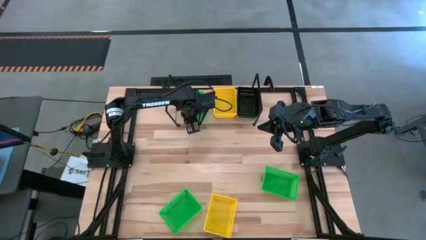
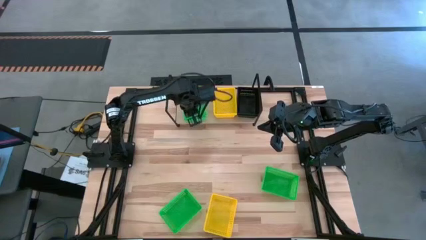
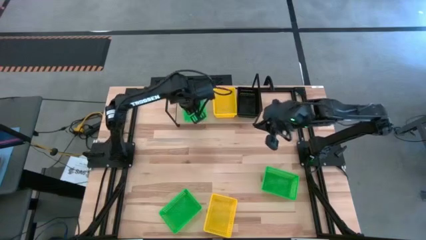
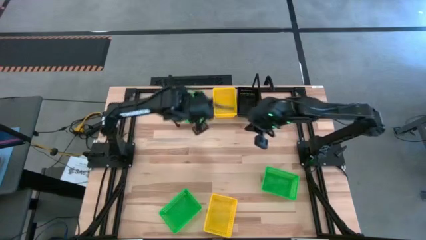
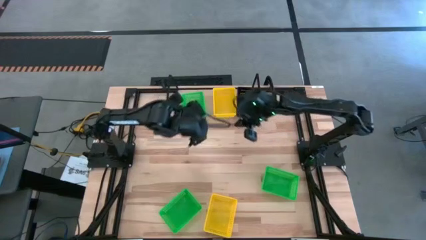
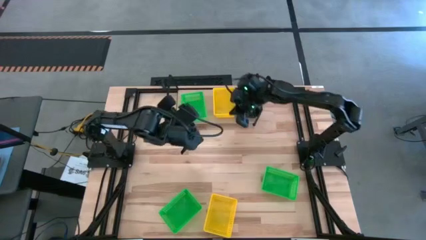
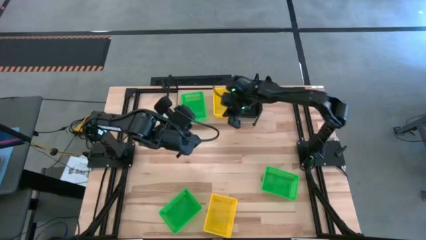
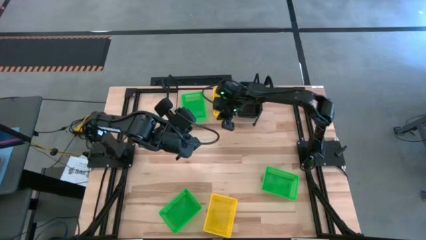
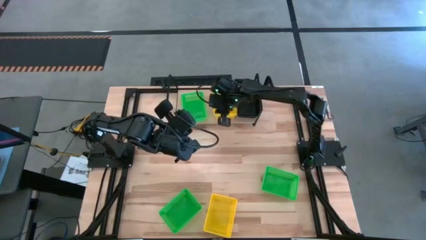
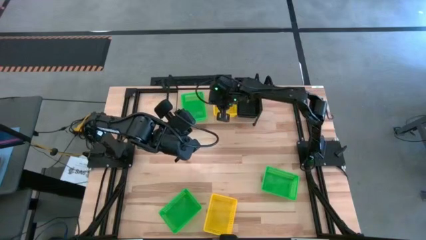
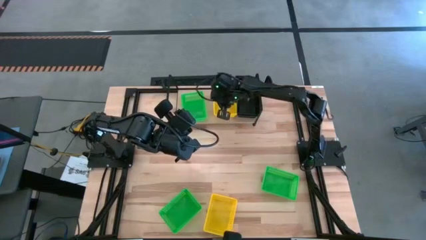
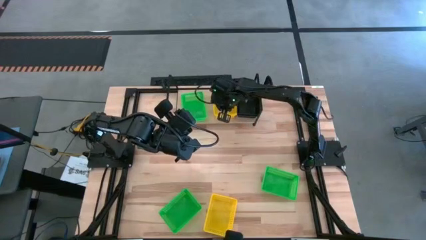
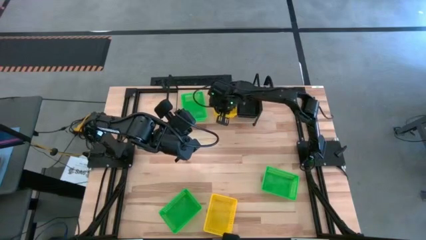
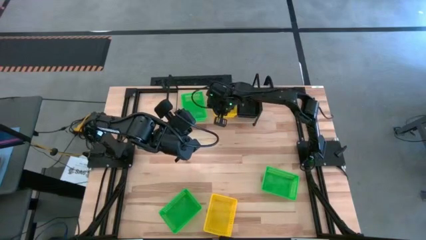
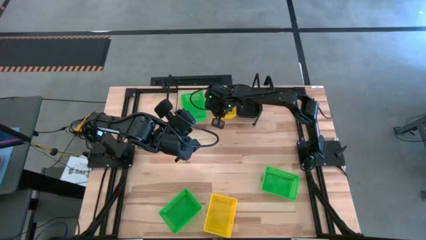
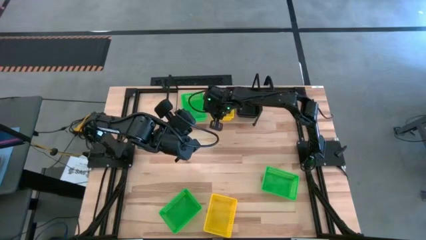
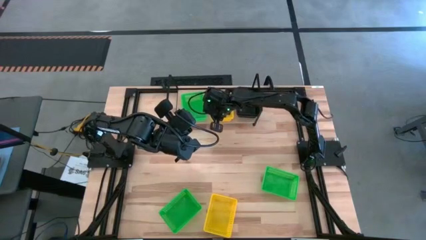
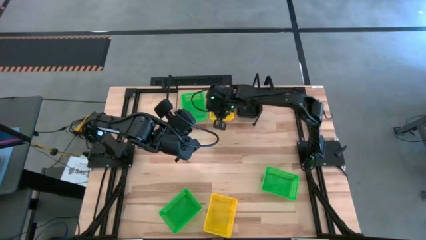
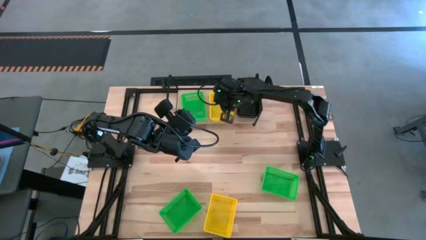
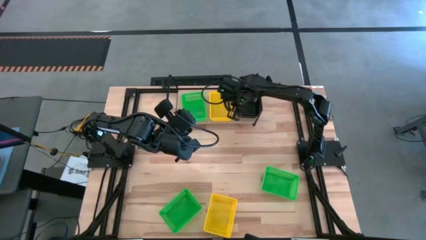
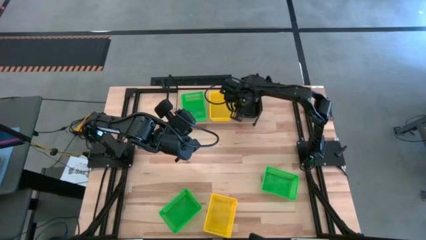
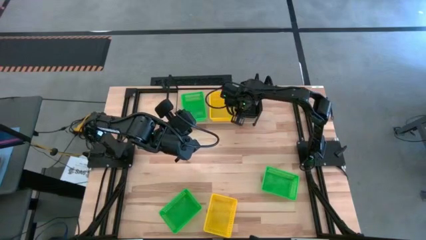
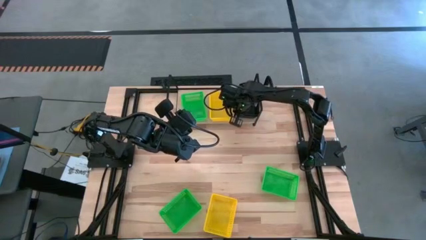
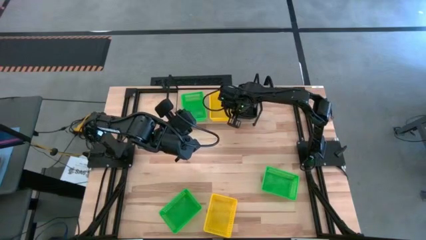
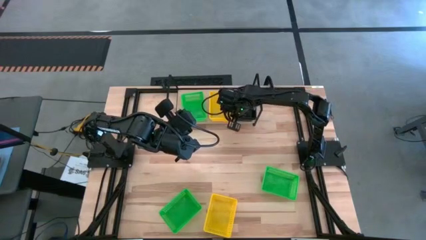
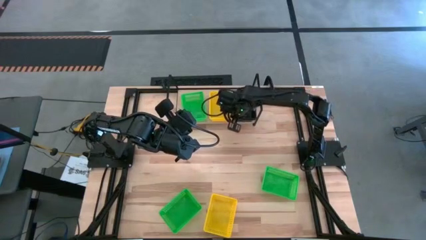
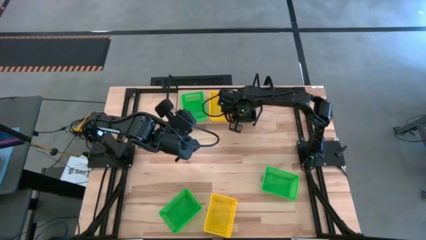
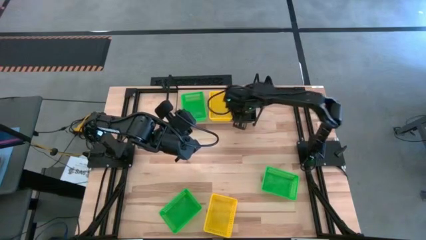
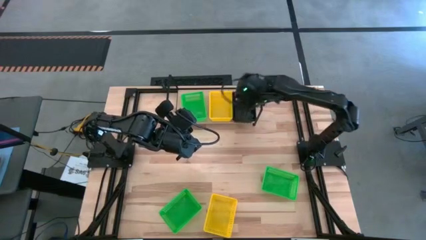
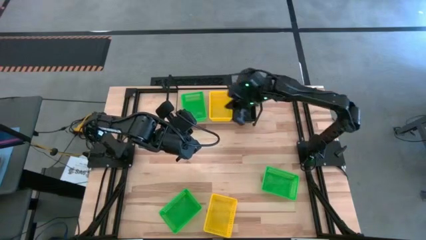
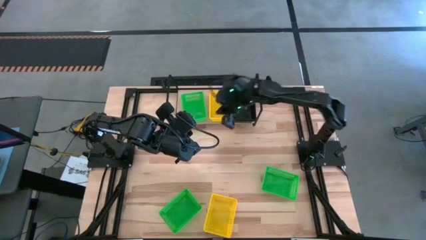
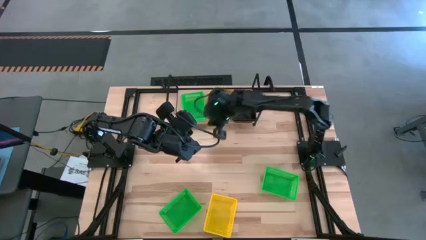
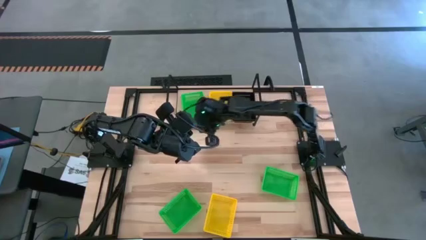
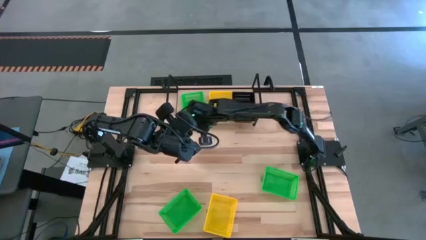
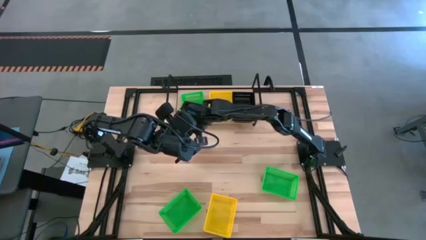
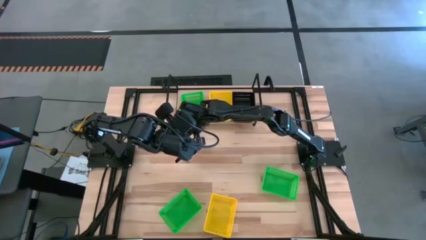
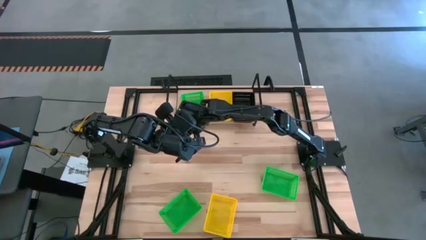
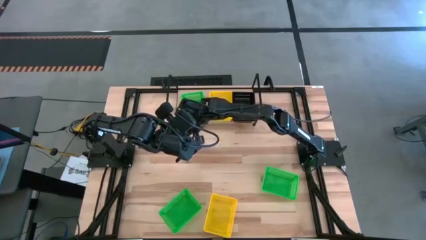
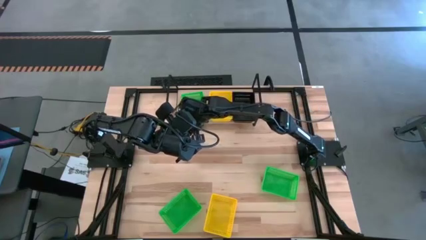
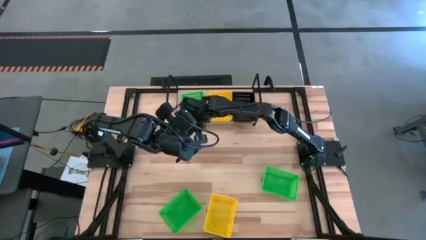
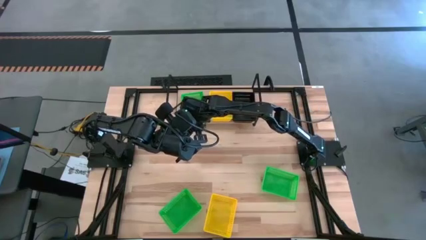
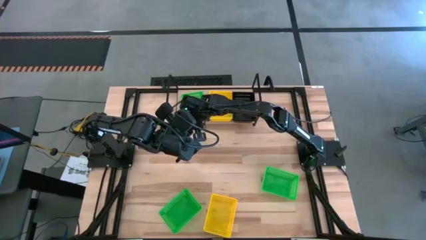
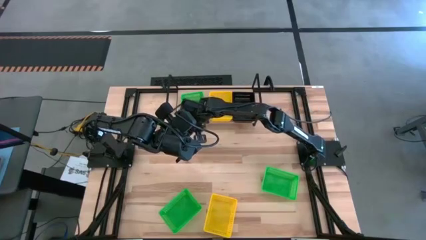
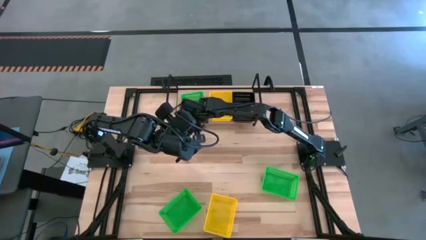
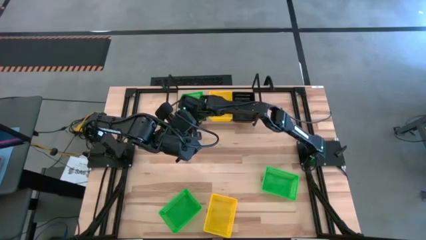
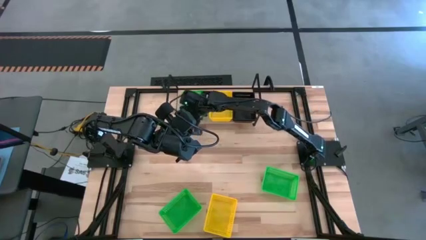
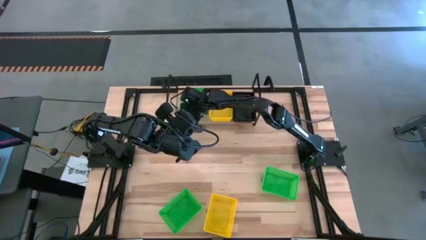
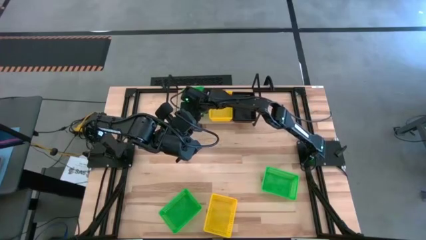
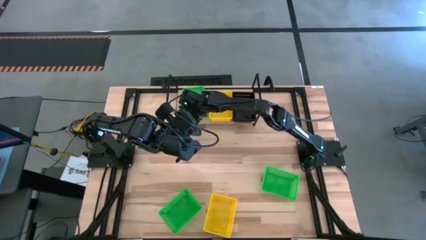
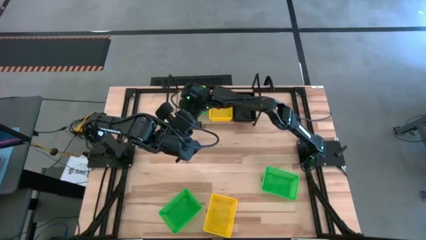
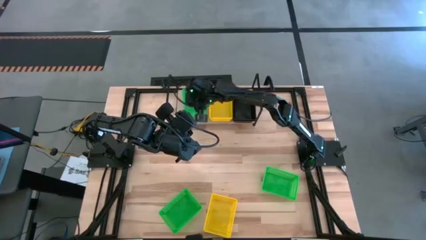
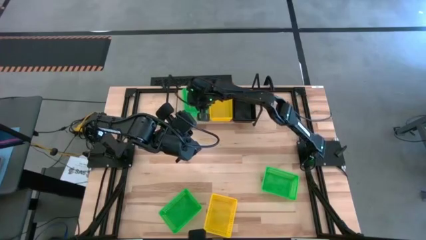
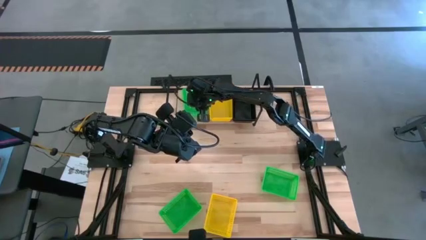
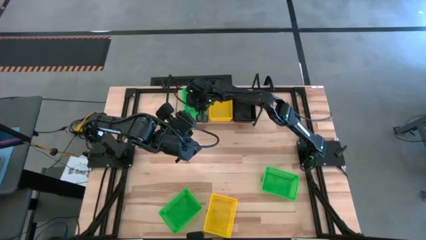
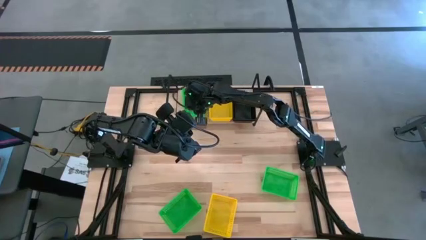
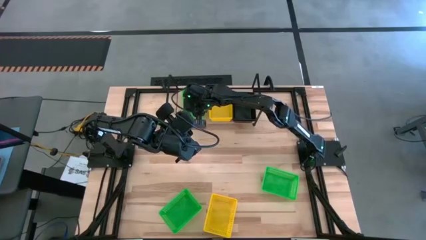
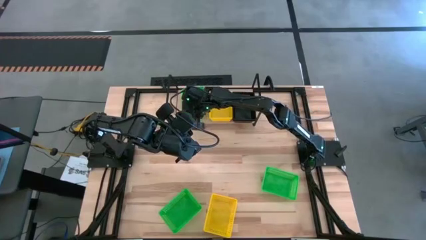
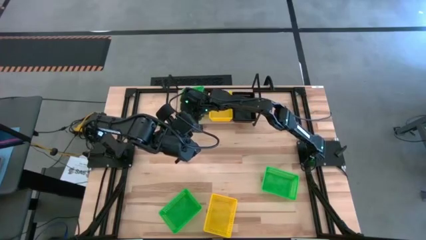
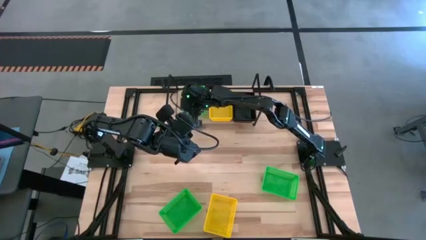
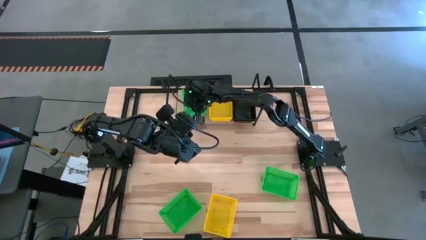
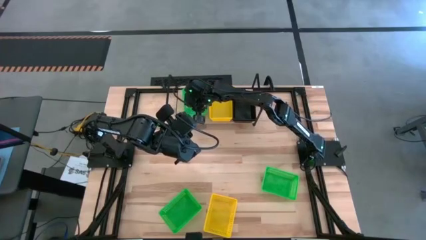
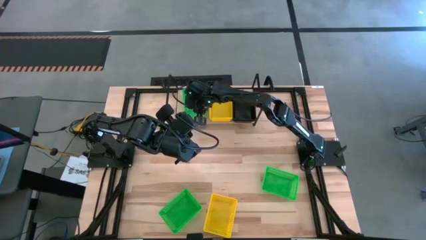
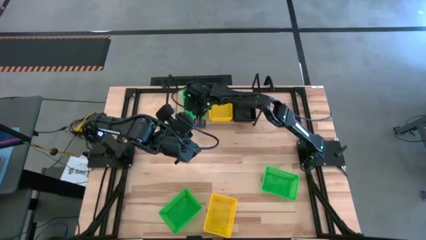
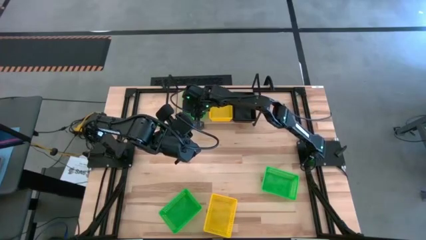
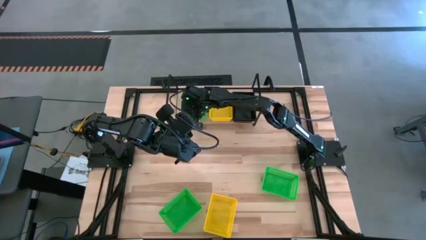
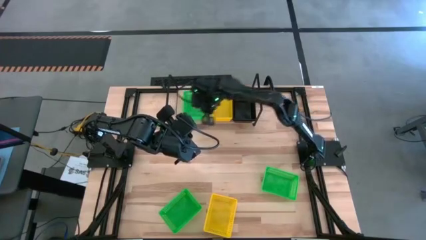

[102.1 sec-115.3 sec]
Task: Stack baskets on shelf by color
Adjust the colored bins on the shelf

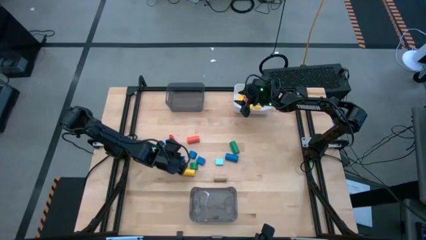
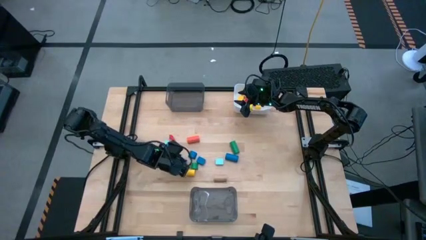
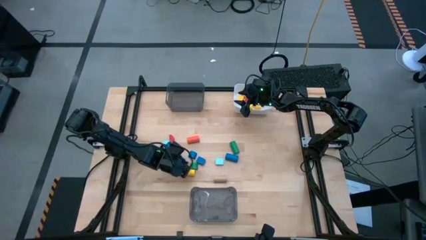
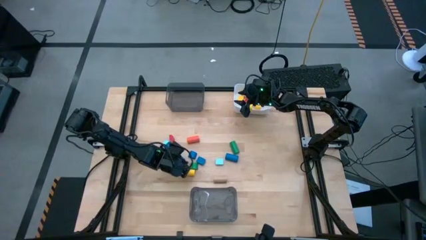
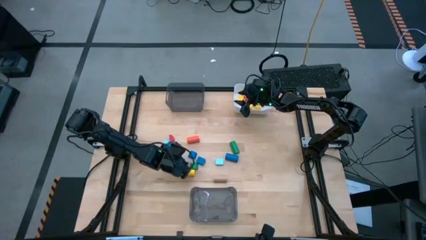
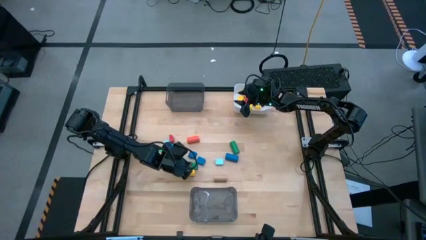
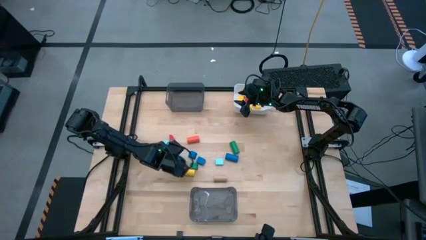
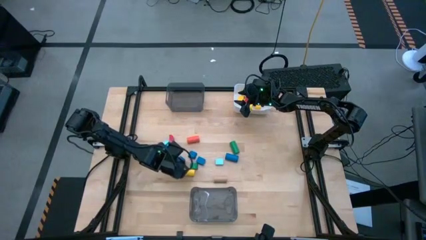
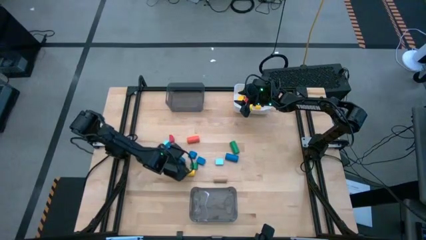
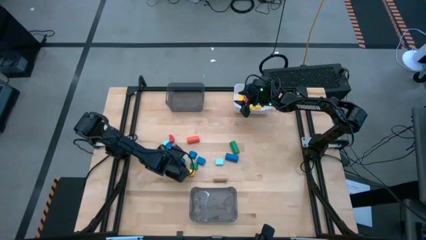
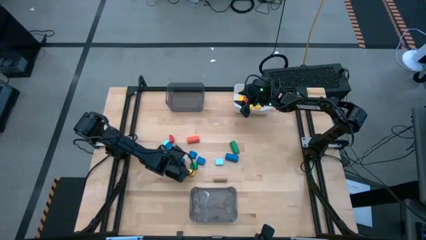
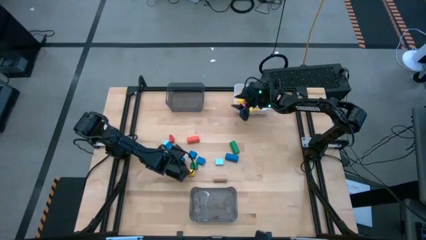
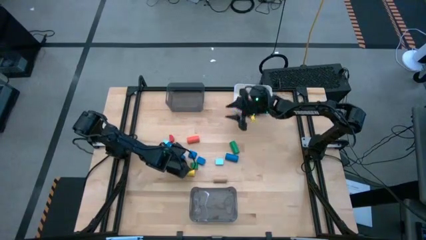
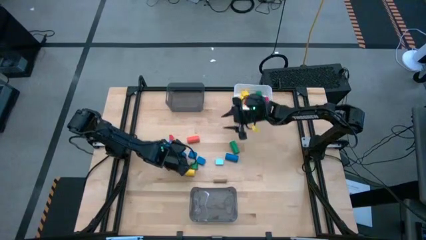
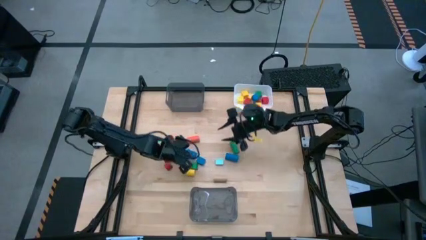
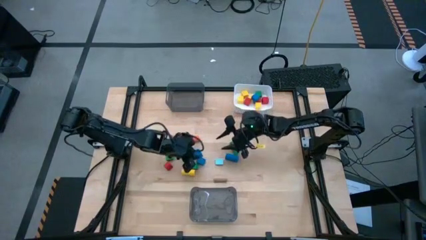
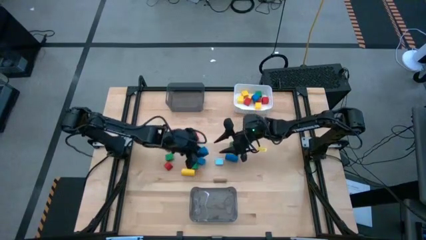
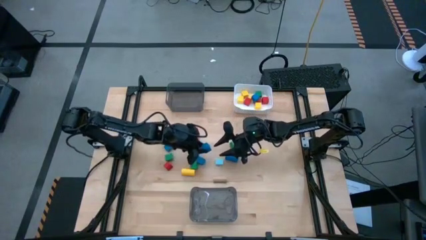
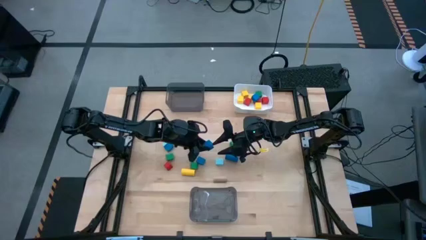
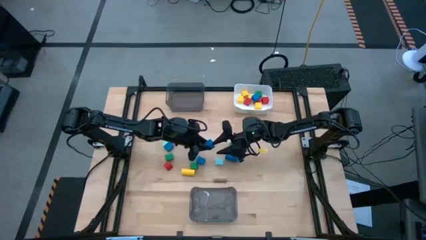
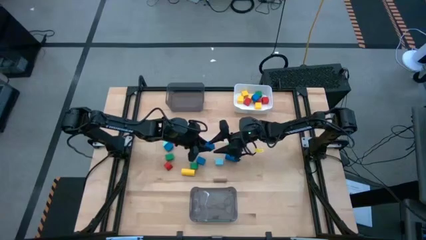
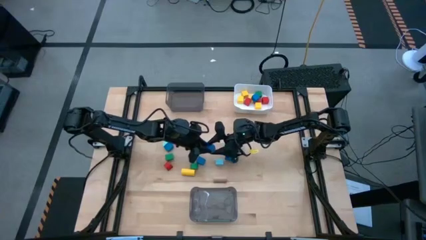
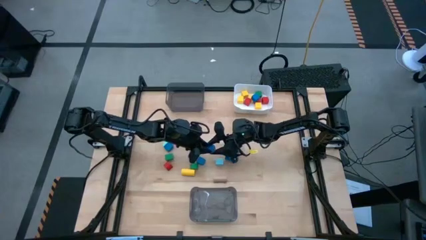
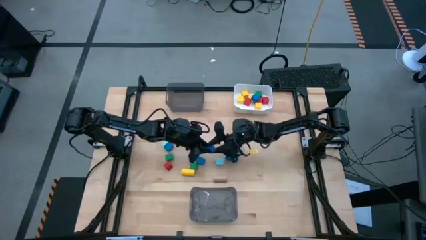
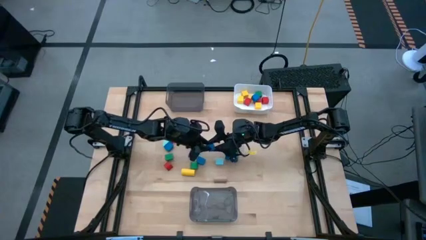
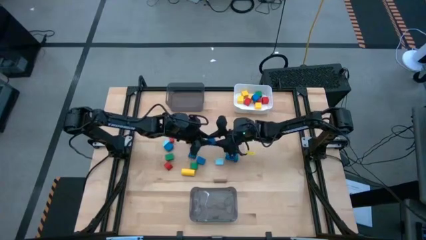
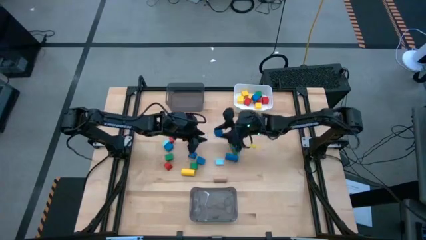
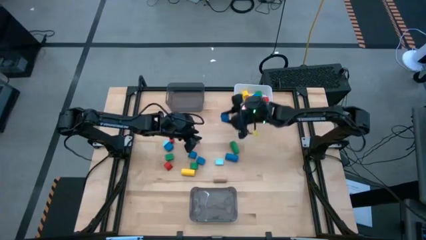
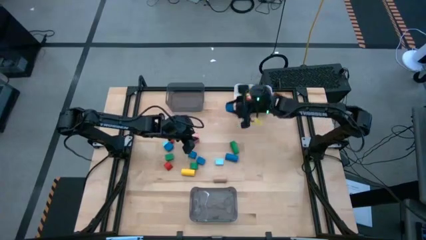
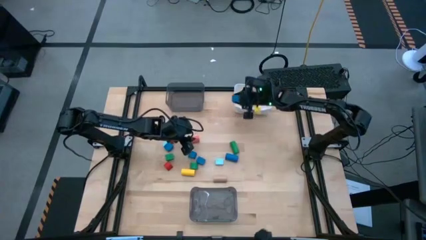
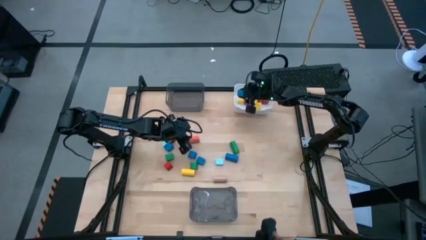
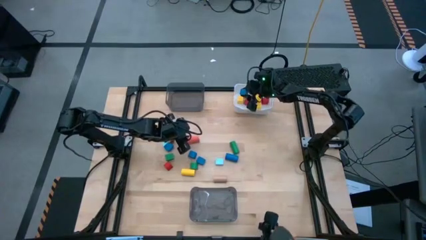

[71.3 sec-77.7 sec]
Task: Sort blocks by size
Put the blue square block into the white bin
